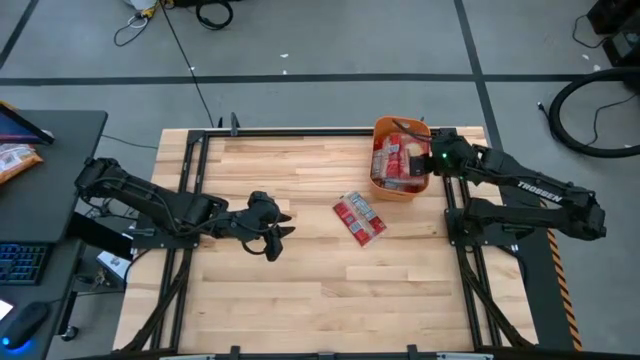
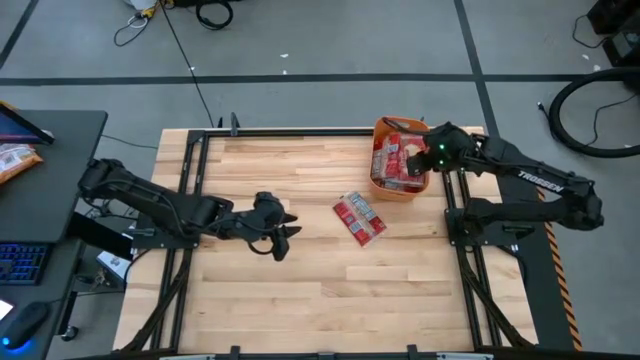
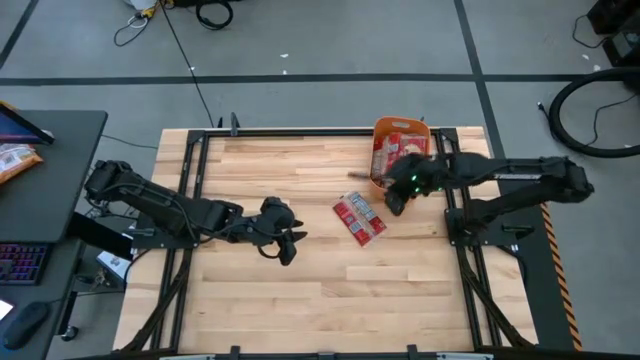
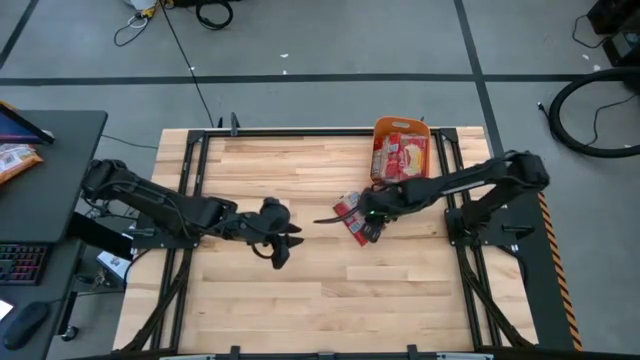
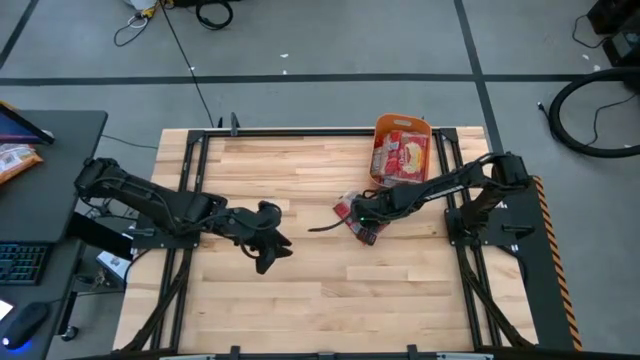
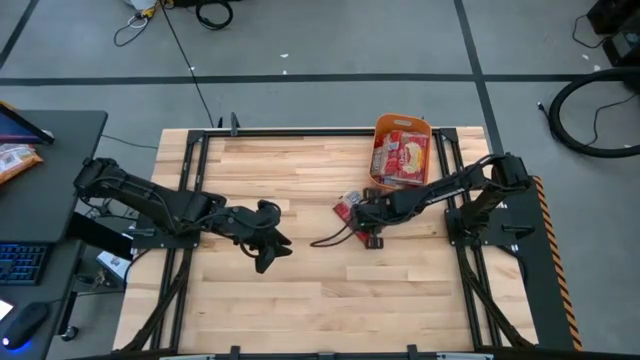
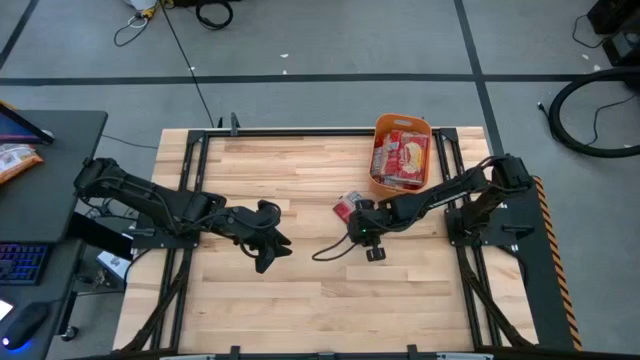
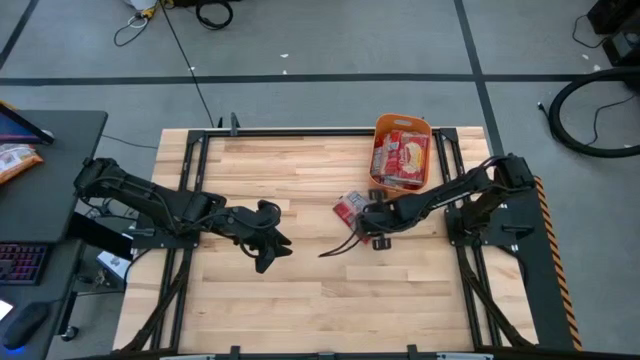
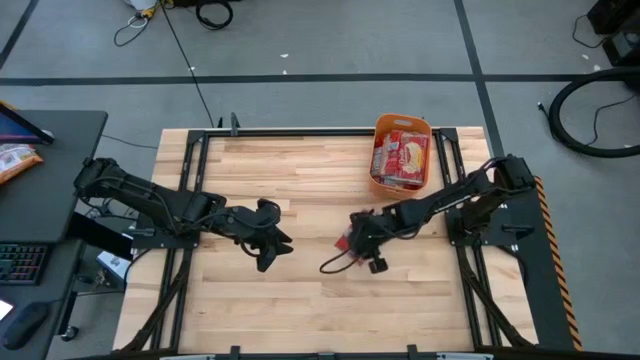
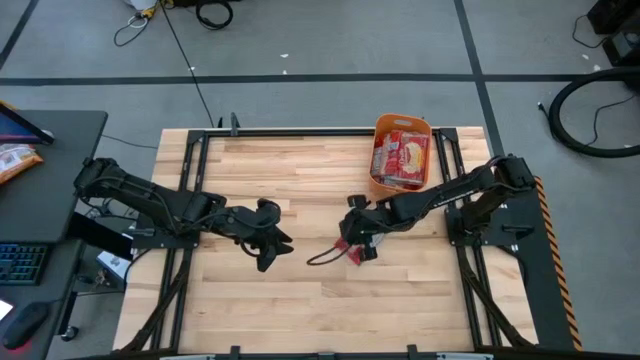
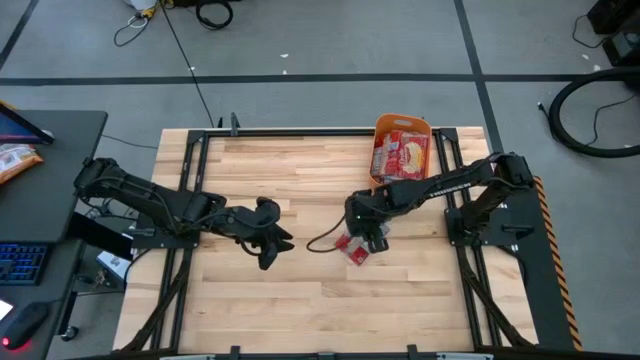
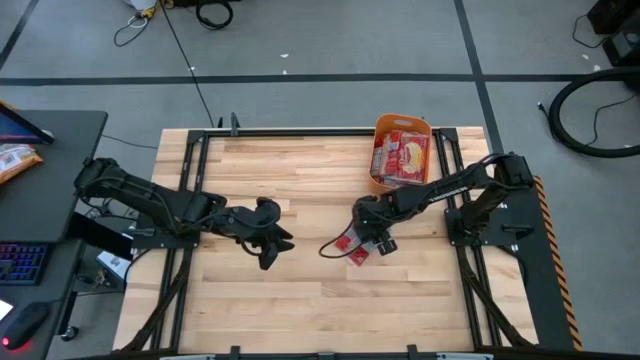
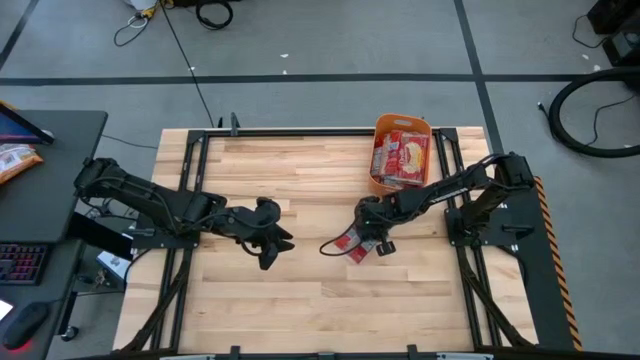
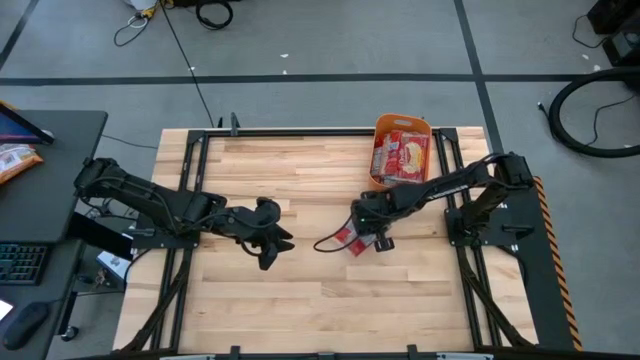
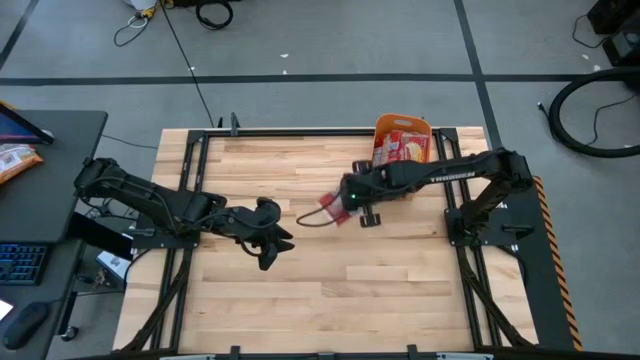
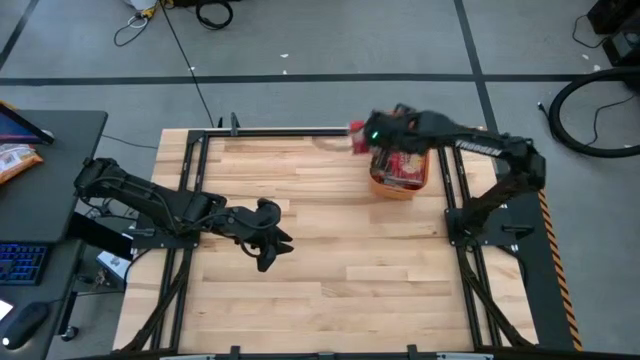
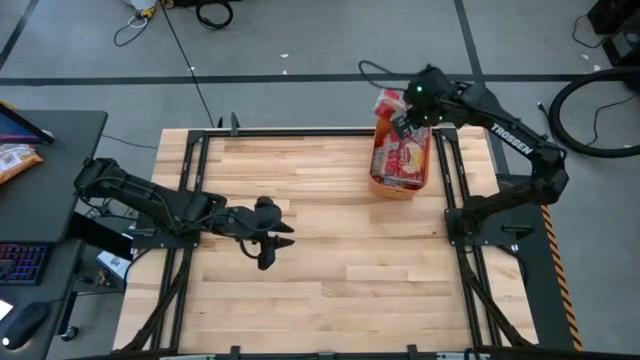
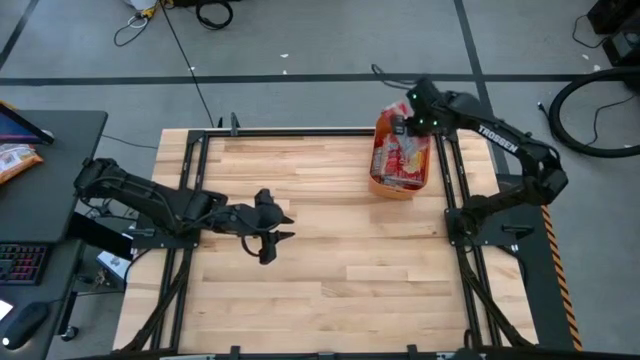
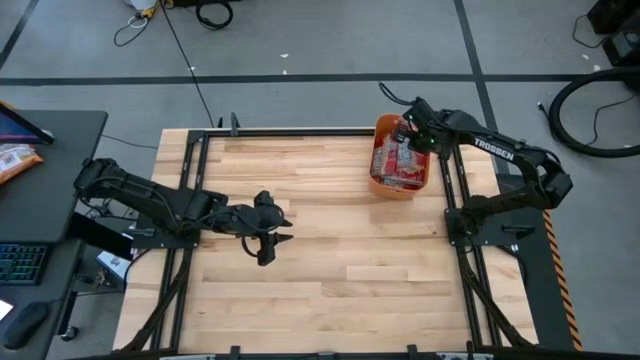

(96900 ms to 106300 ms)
Task: Sort popcorn bags into baskets
Put the red popcorn bag into the orange bin

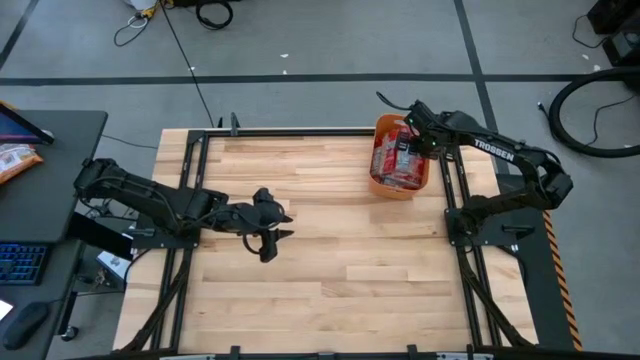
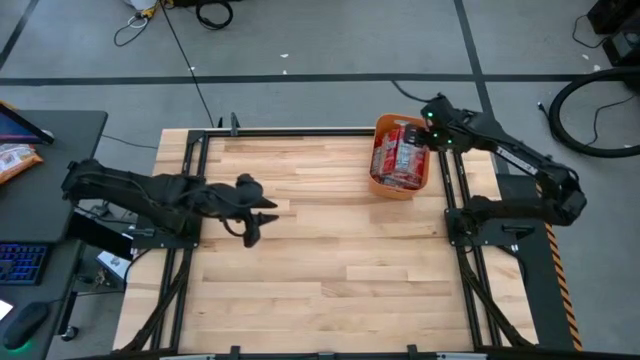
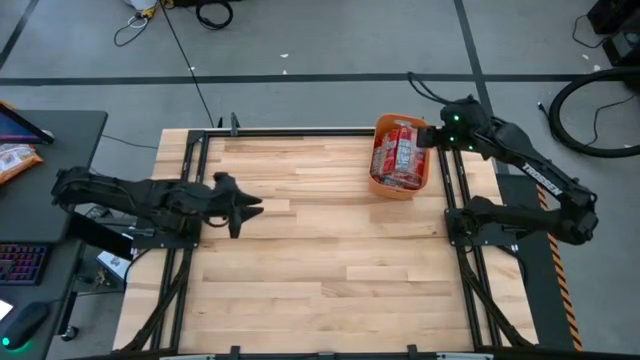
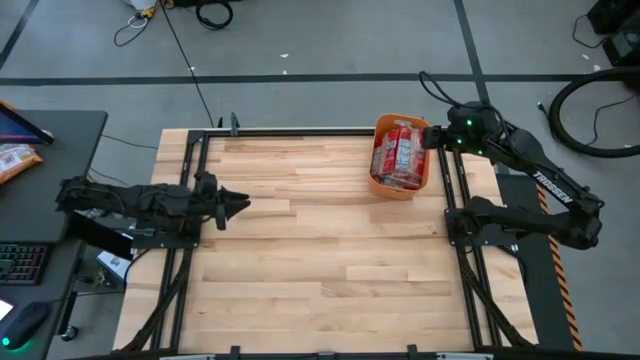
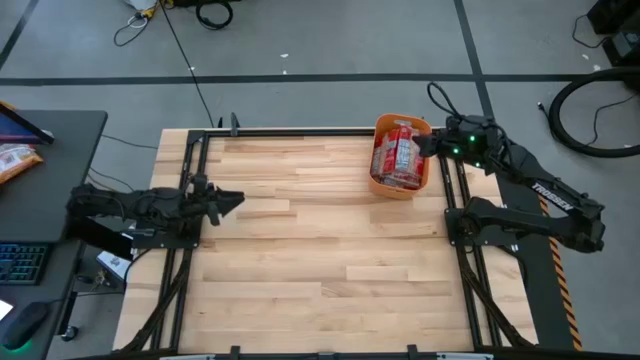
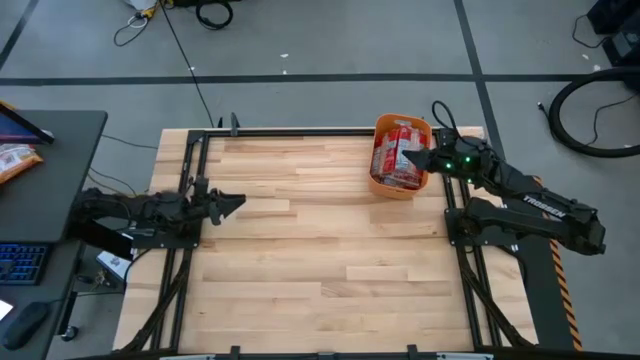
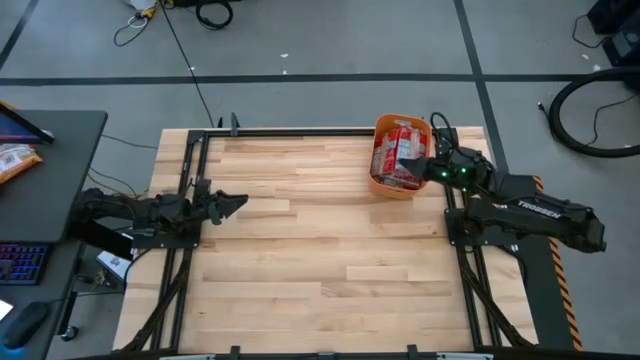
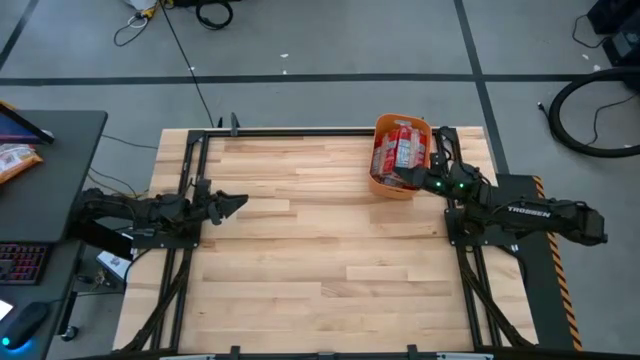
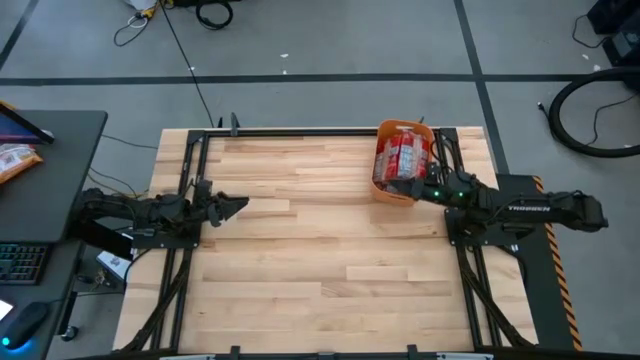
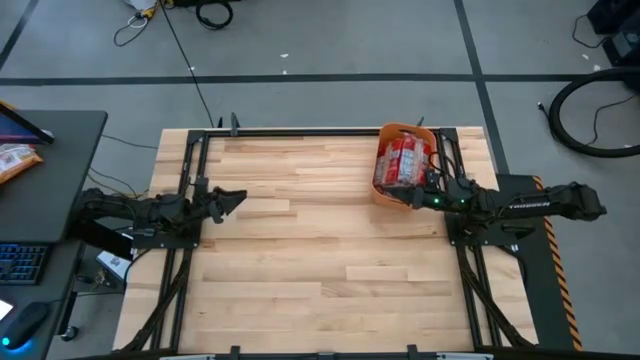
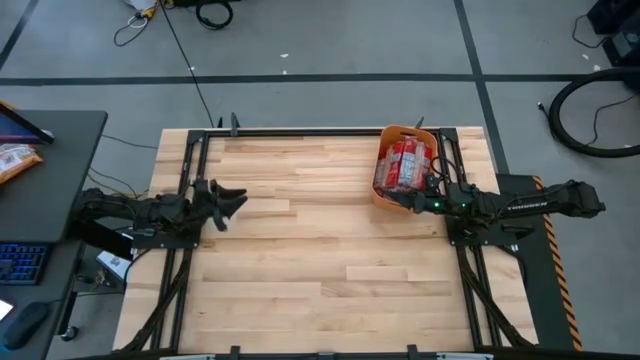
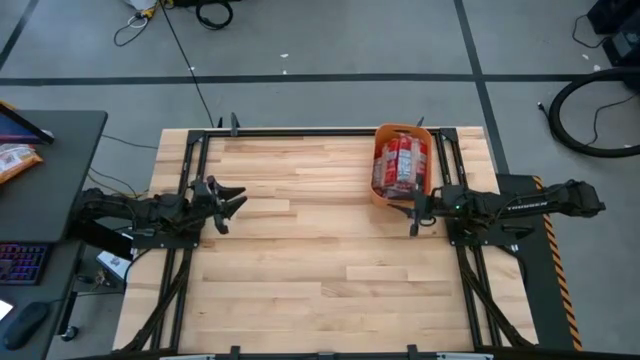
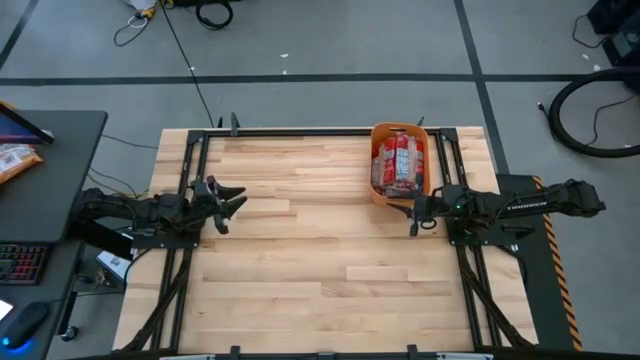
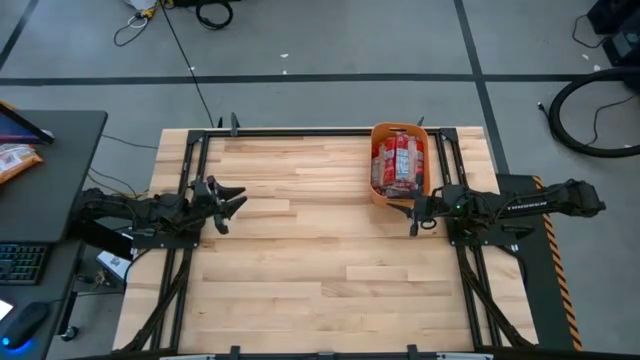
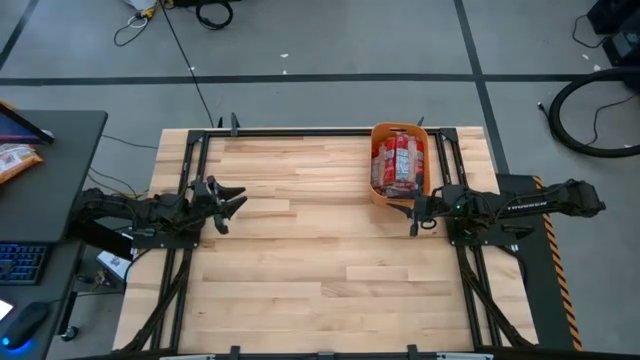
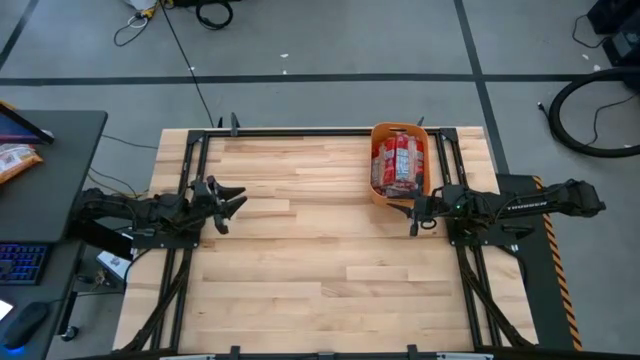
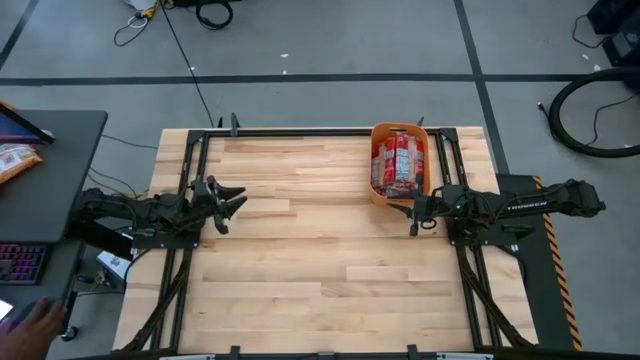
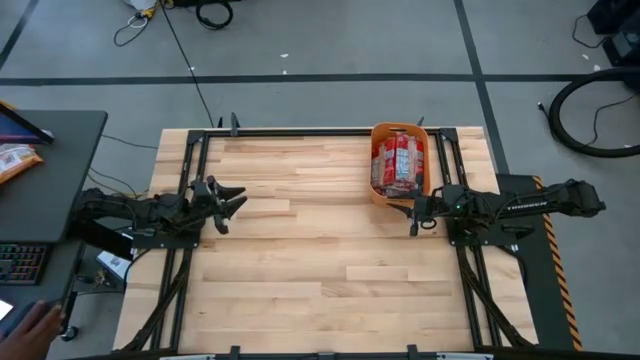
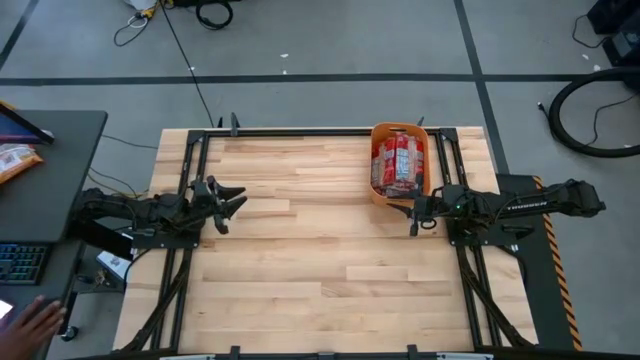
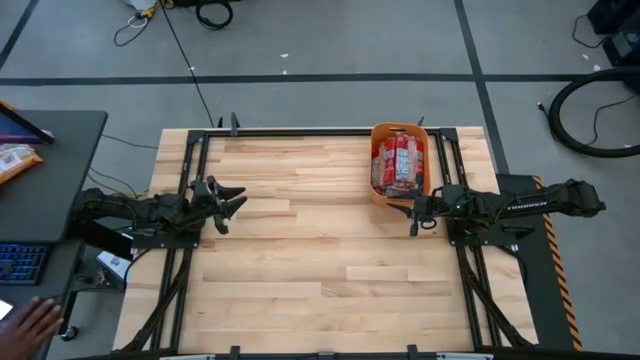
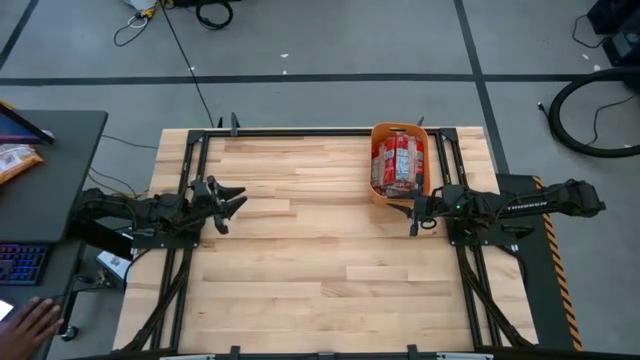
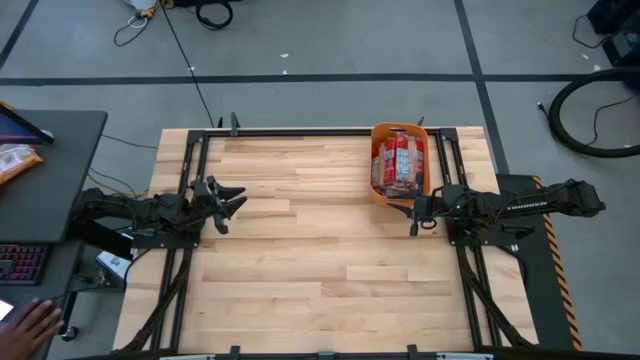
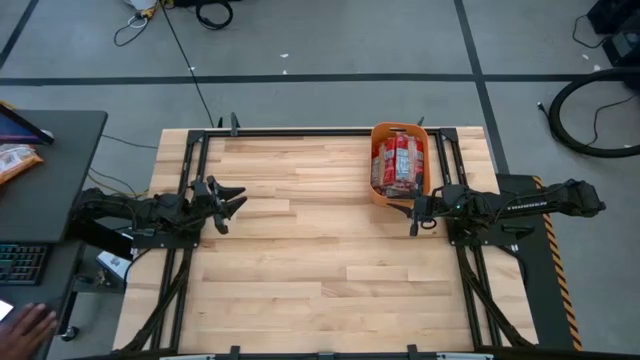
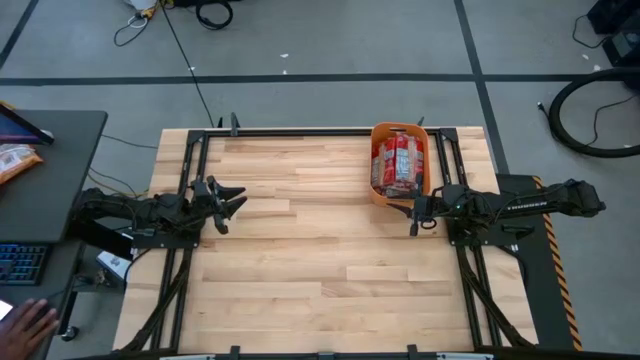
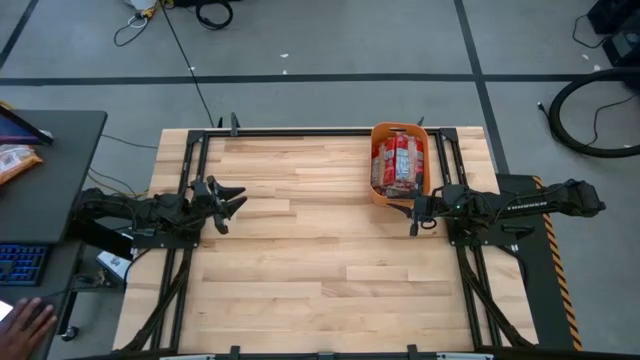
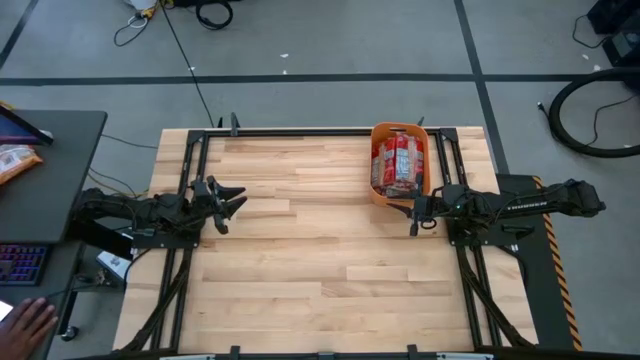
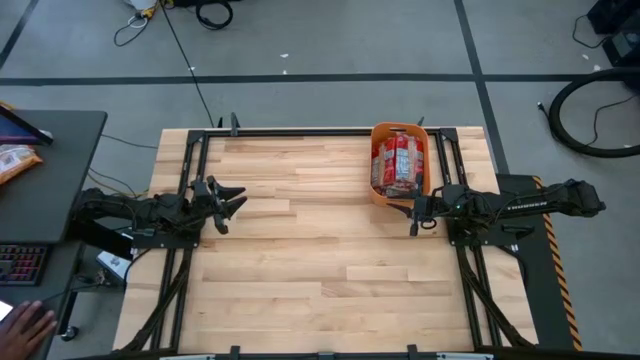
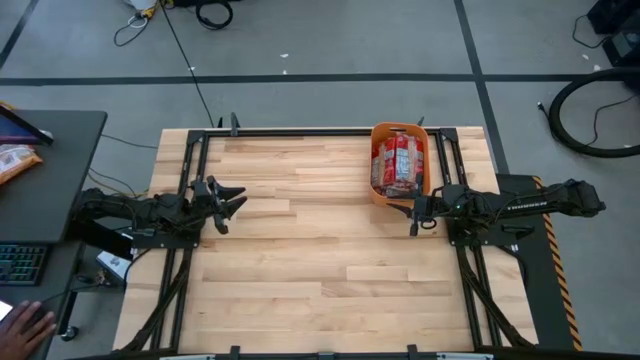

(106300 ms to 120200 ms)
Return to Home Position
